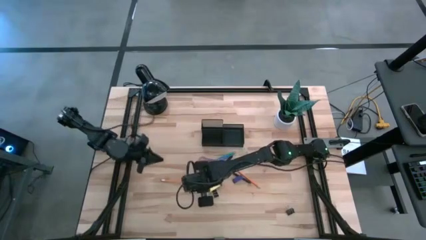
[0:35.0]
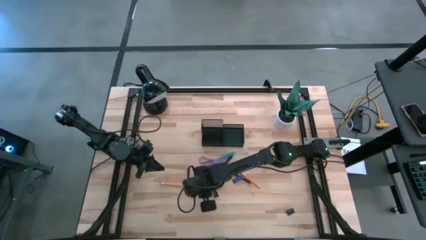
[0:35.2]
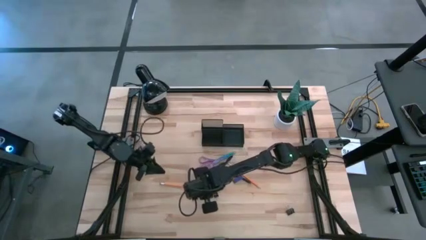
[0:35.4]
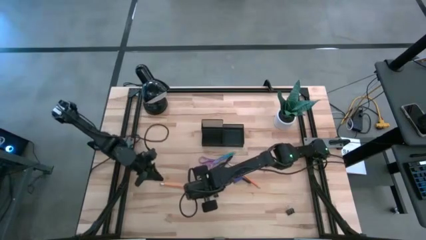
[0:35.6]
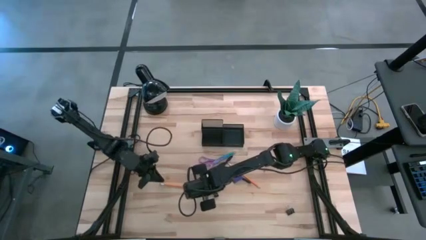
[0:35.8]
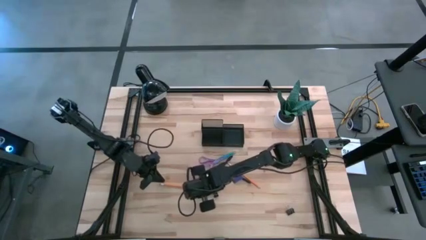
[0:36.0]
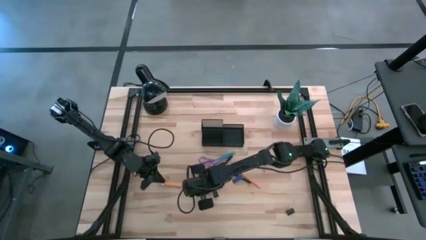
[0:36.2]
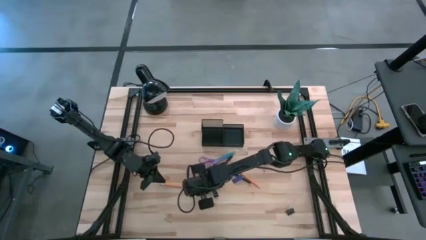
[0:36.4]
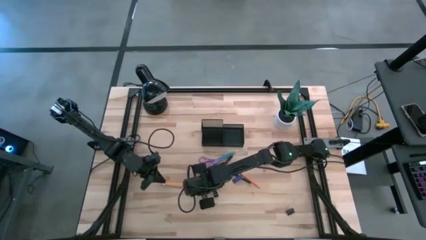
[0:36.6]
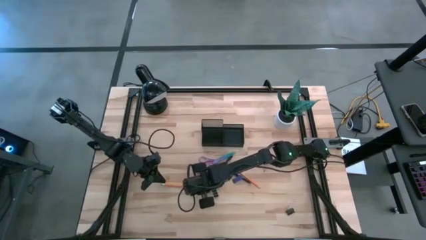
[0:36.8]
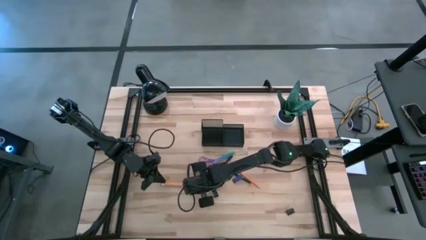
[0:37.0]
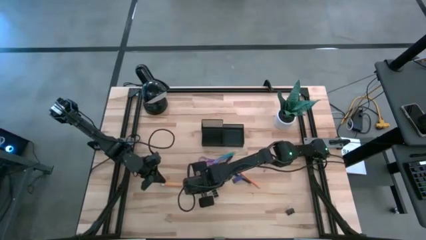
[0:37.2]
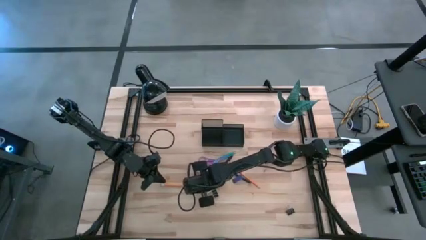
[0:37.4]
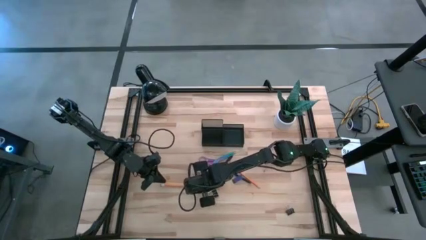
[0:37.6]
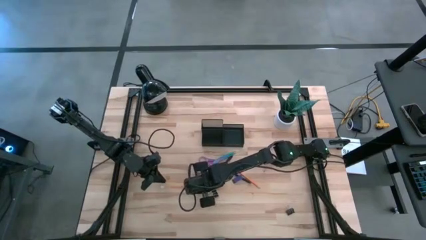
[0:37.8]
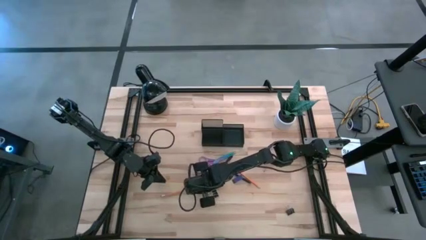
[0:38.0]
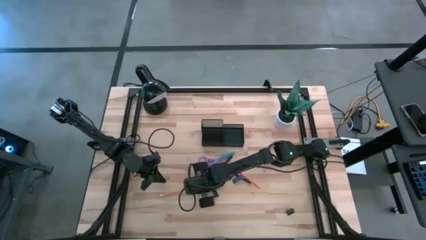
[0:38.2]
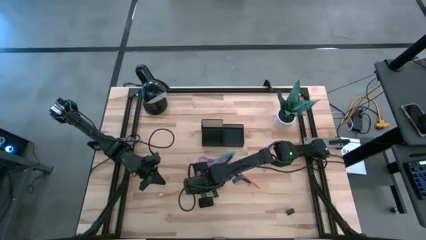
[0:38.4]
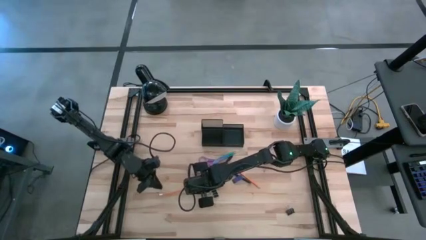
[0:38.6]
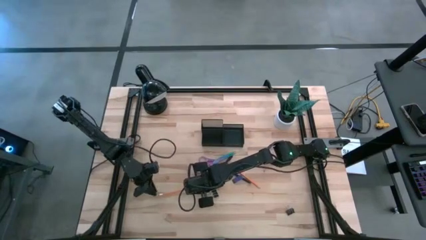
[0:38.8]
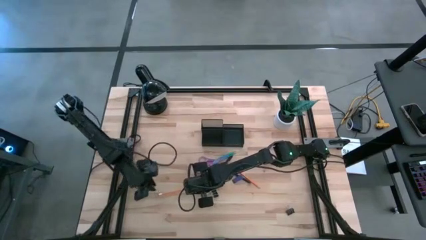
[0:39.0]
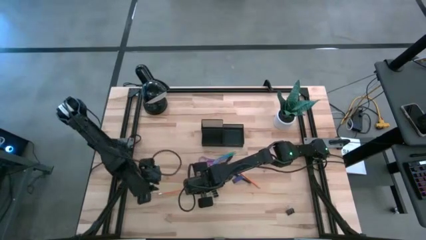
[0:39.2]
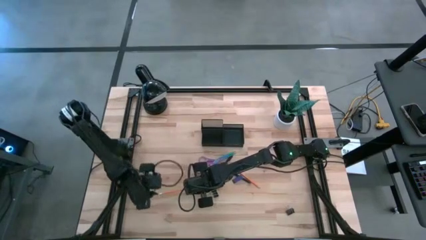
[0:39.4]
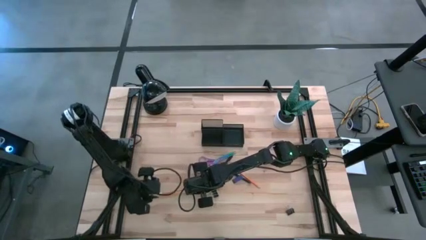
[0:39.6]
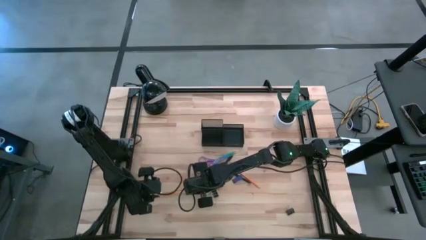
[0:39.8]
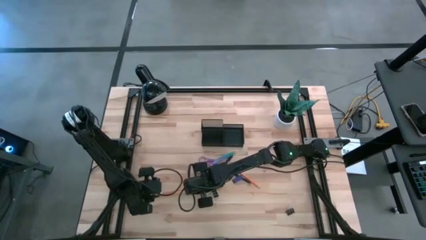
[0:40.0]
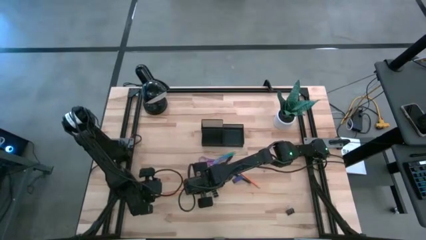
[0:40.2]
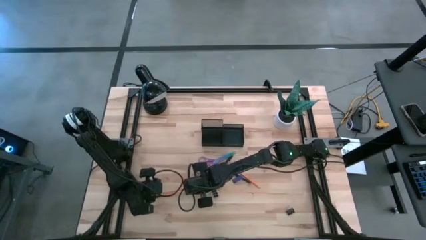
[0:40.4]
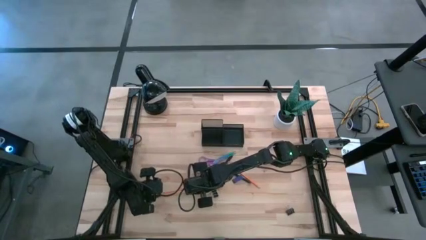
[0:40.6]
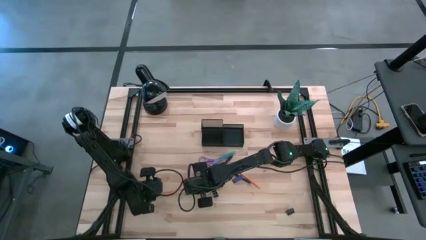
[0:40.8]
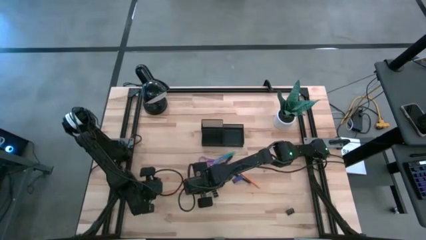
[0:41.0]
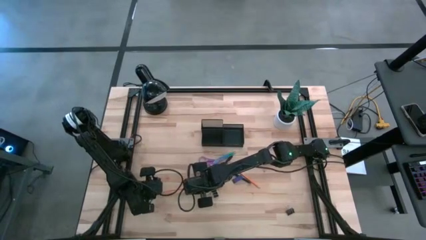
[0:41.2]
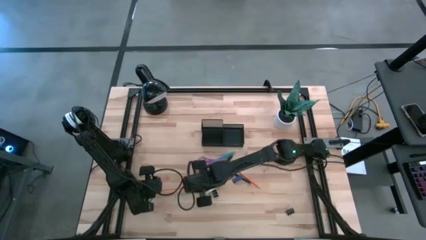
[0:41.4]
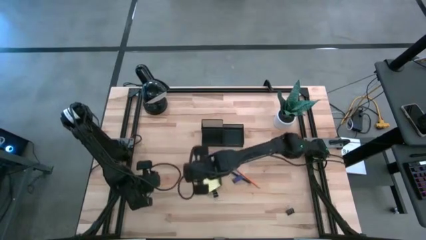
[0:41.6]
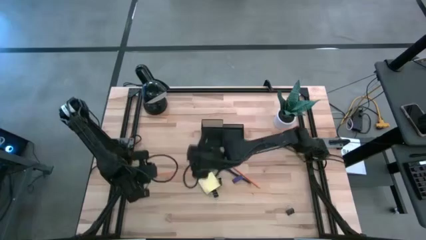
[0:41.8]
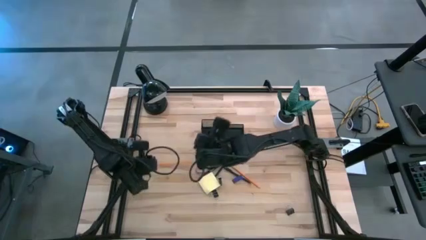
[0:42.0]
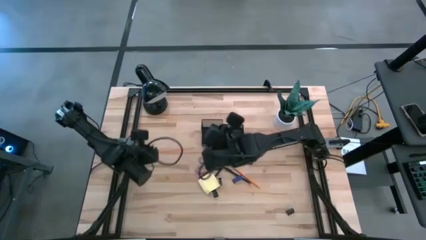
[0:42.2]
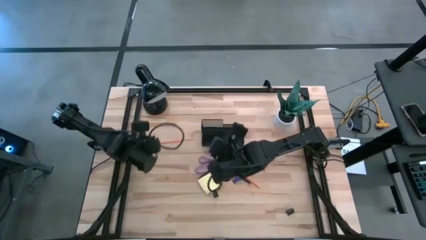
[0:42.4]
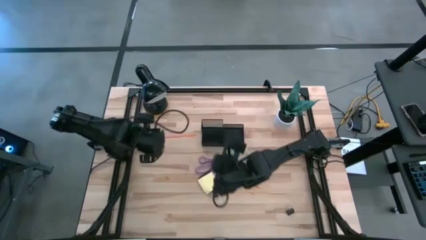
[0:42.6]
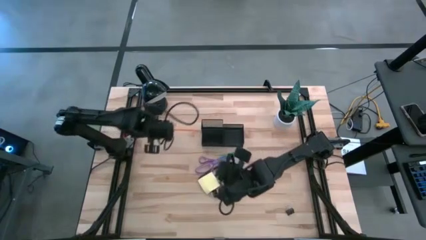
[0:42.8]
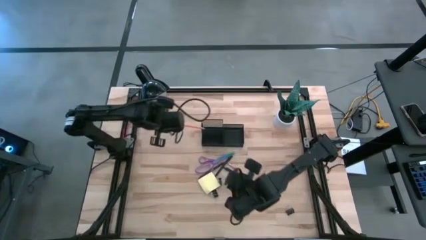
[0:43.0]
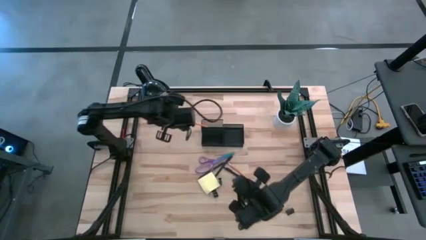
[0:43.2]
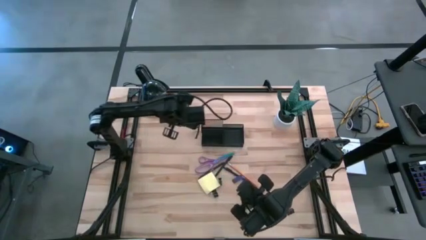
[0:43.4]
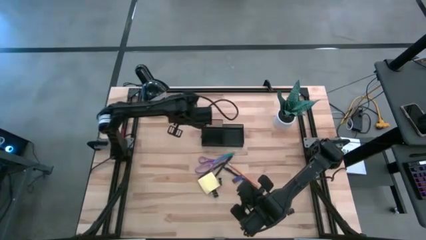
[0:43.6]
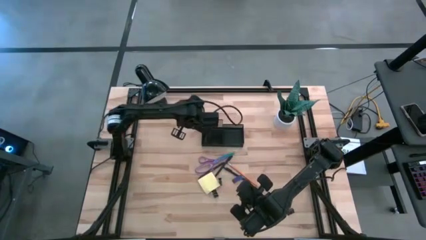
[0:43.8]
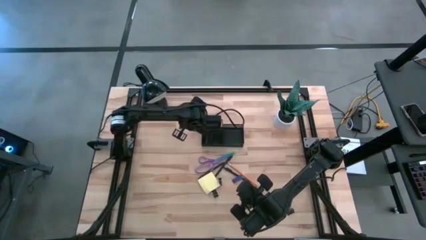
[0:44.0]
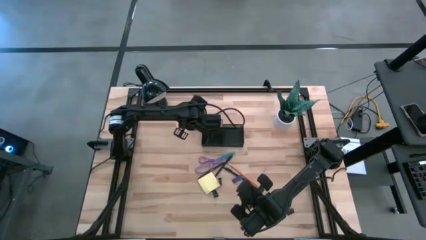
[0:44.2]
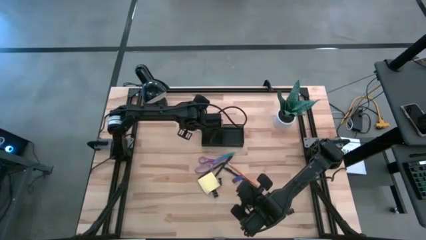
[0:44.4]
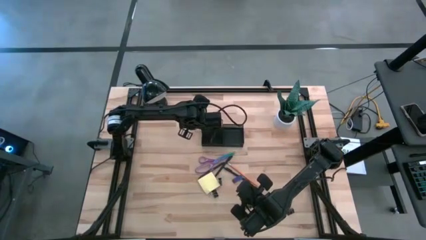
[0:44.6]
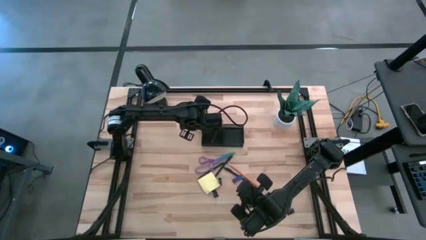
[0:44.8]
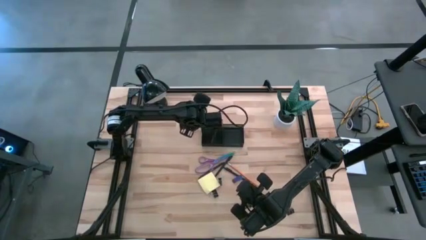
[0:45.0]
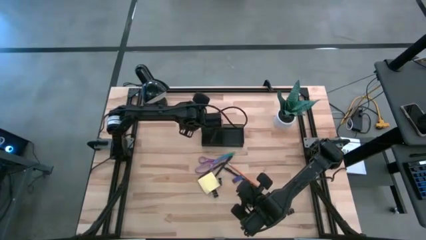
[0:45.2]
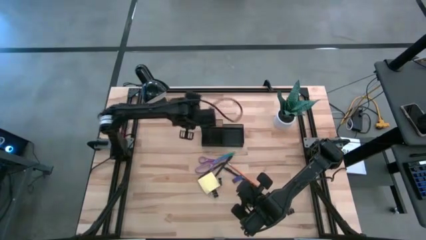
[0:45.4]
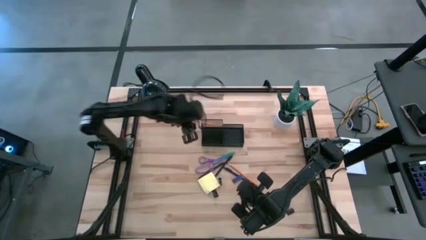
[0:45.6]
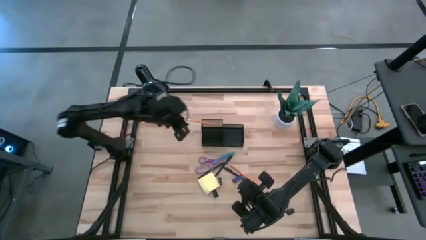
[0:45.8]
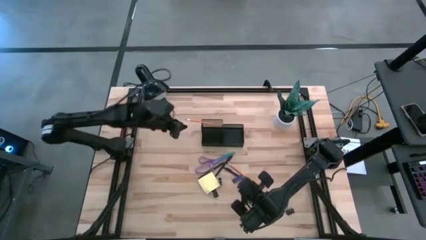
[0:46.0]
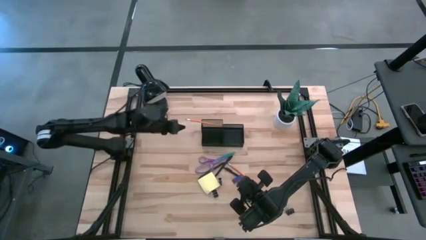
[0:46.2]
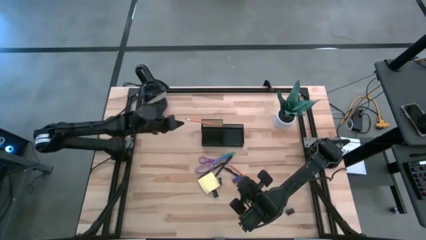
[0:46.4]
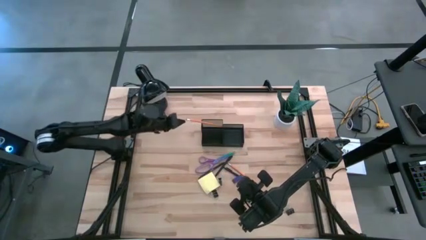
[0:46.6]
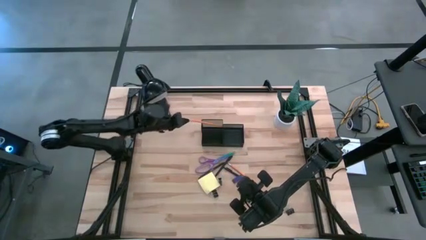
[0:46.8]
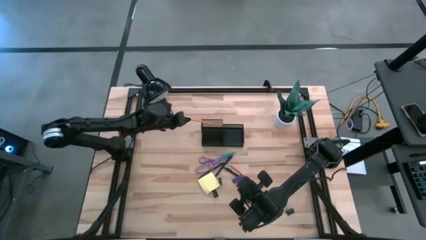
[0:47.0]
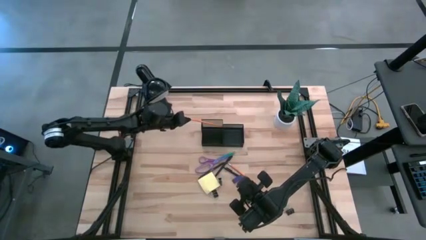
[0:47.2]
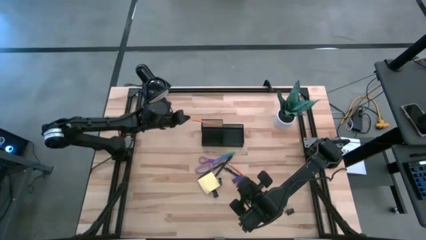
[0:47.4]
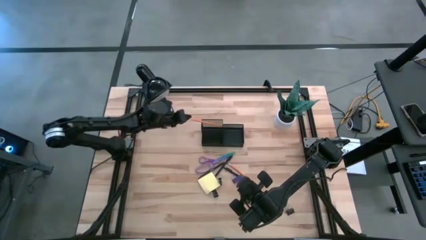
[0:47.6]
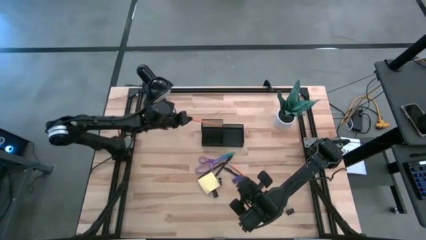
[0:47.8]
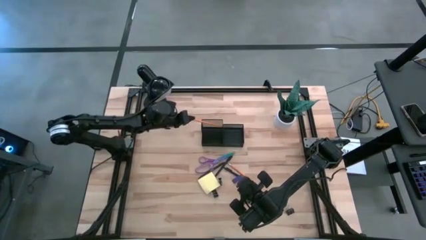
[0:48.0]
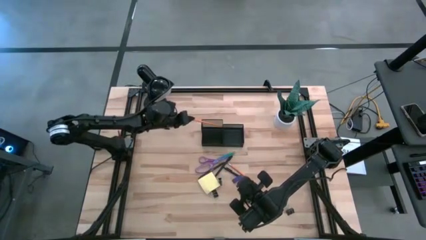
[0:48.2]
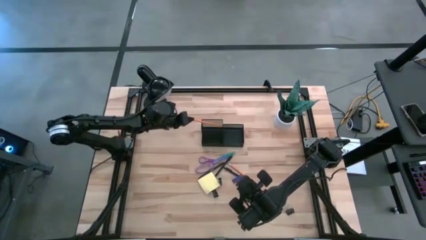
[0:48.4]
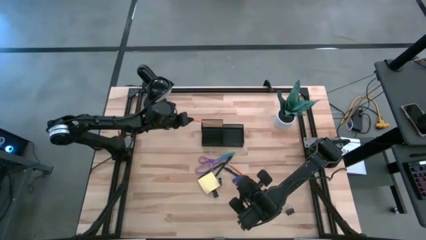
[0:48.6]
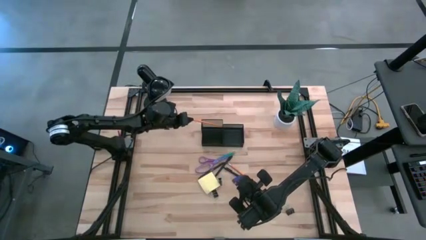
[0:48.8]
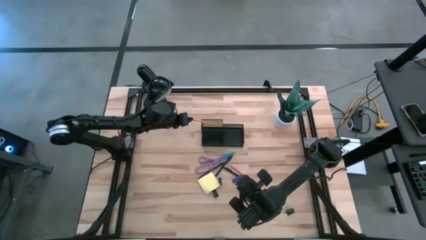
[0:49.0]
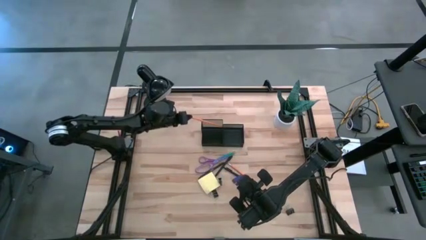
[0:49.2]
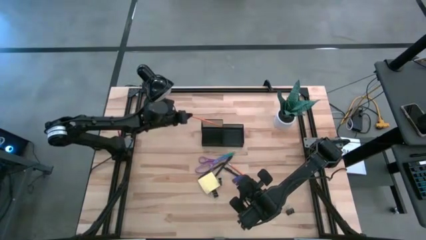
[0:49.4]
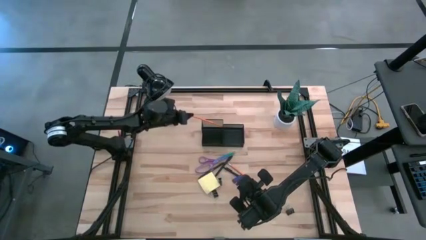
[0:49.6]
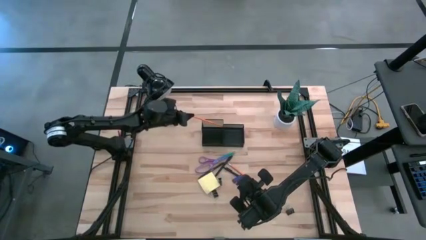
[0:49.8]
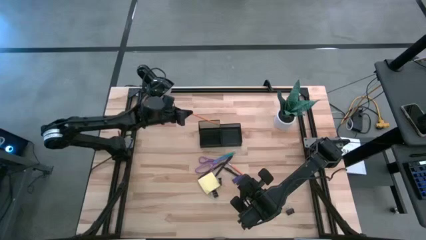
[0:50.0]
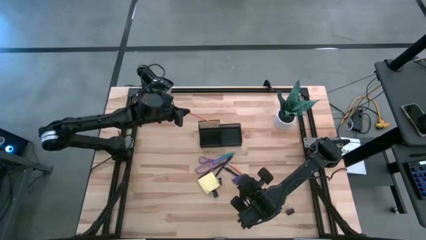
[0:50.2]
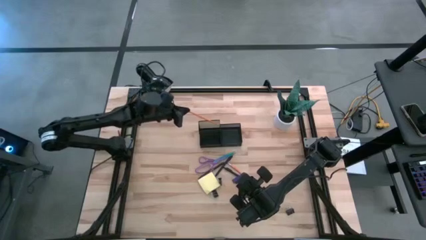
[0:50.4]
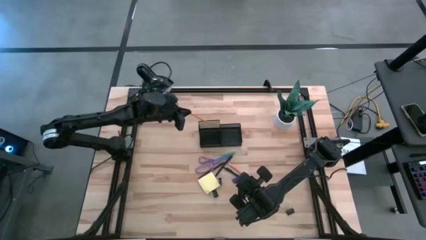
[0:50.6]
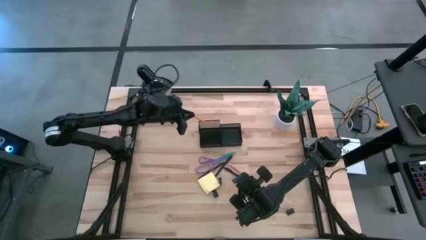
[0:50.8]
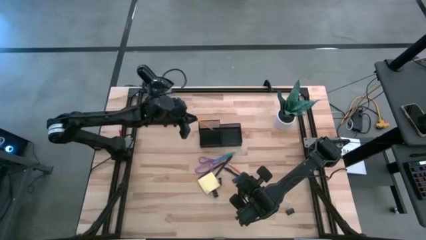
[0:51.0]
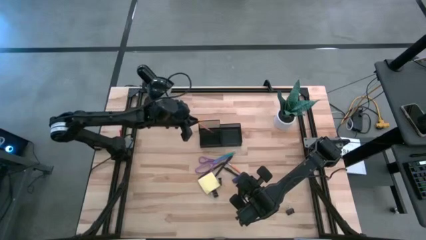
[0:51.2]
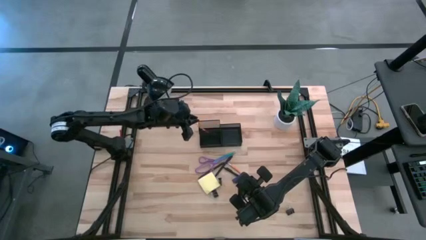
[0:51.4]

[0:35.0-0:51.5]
Task: Pick and place office supplies into organizer
Put the left orange pencil into the black desk organizer
